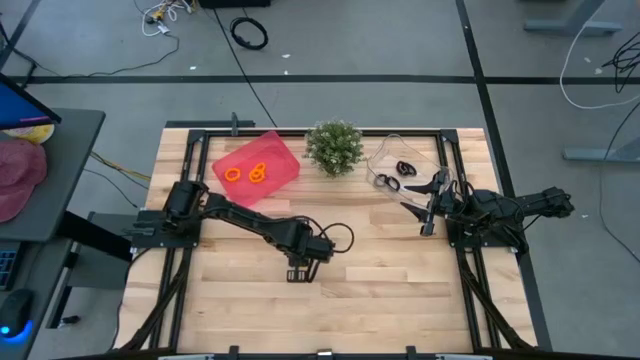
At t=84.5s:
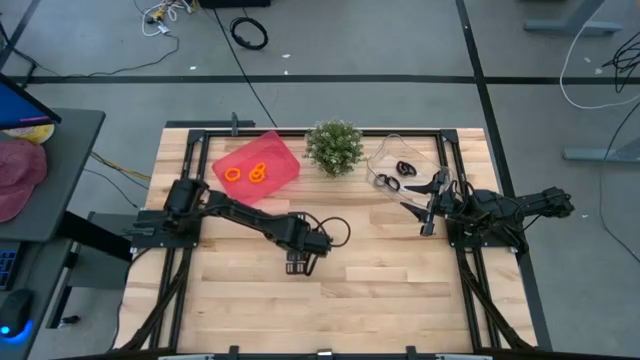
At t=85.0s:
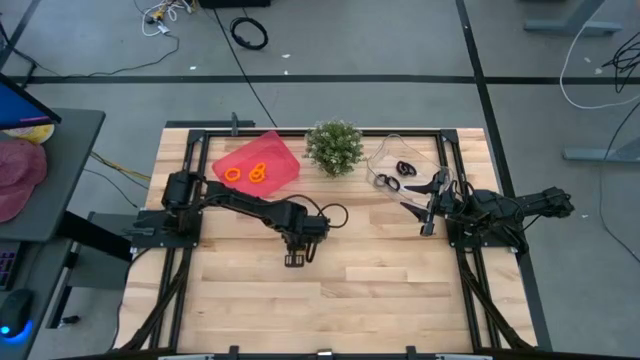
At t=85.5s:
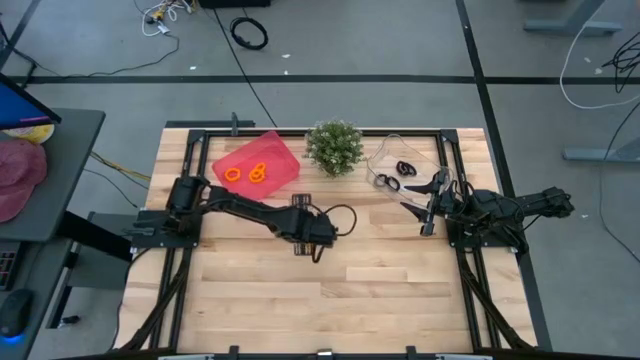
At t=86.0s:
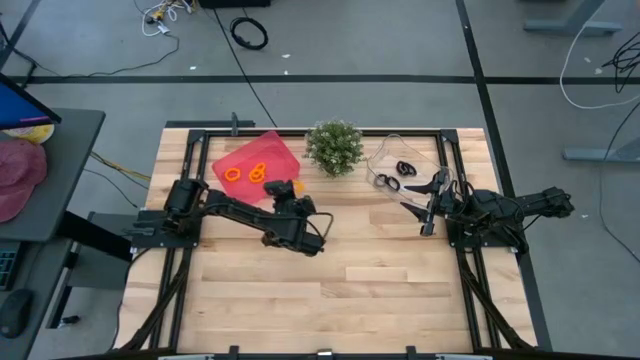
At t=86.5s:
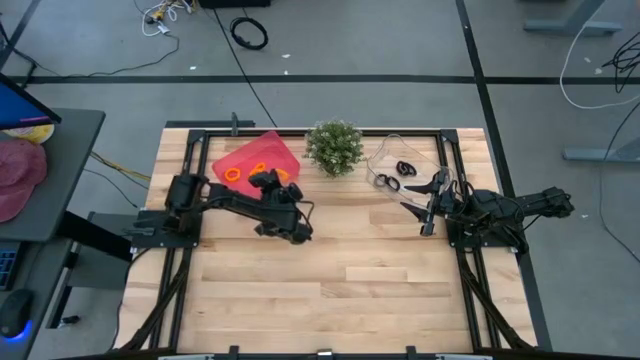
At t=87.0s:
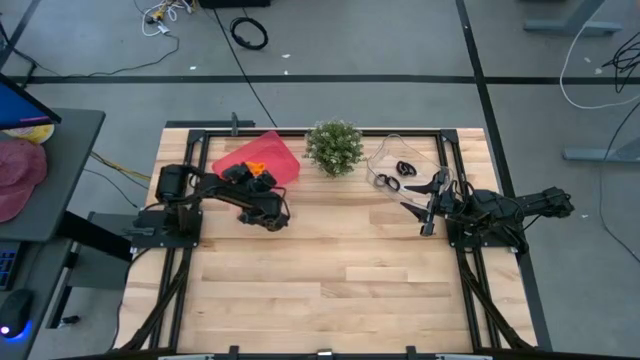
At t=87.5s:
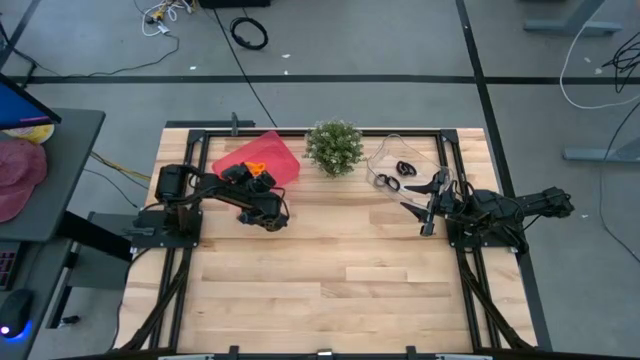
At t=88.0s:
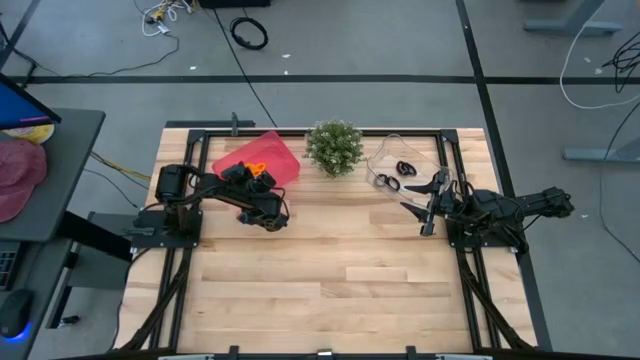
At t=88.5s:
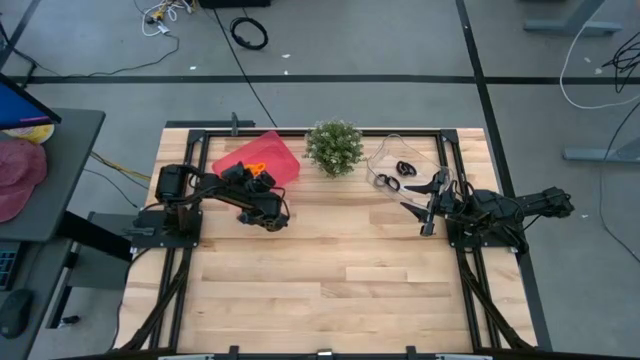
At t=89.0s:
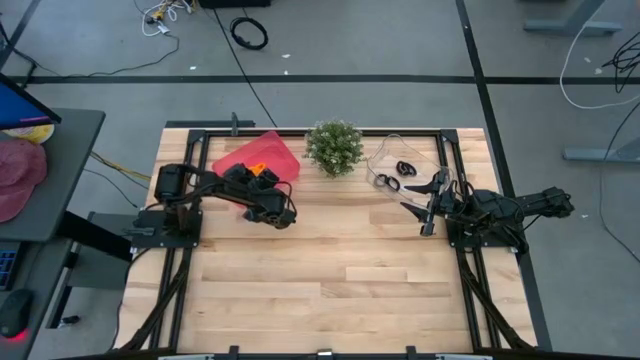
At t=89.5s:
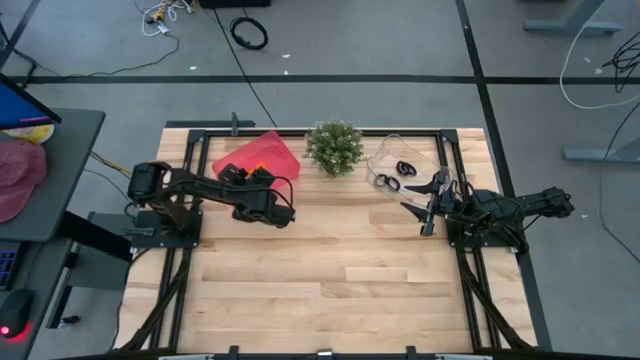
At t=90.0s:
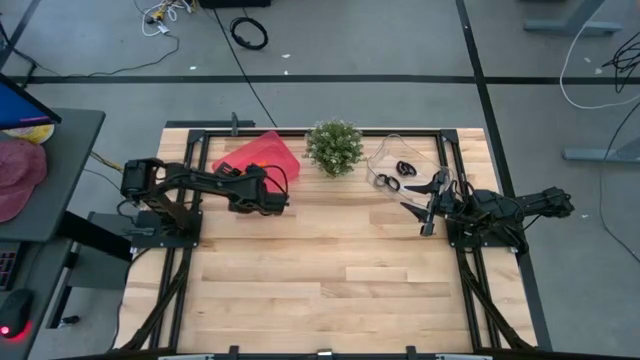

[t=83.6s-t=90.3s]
Task: Sort spring keychains
Put the yellow spring keychain into the pink bin

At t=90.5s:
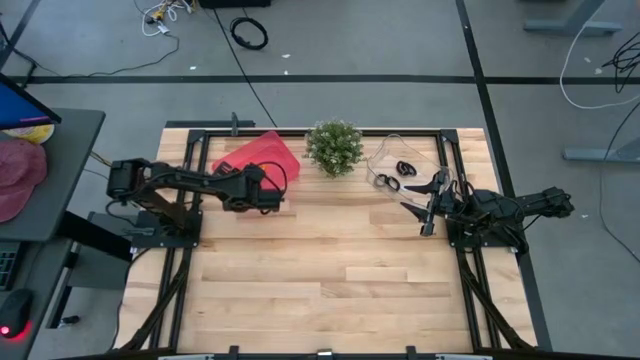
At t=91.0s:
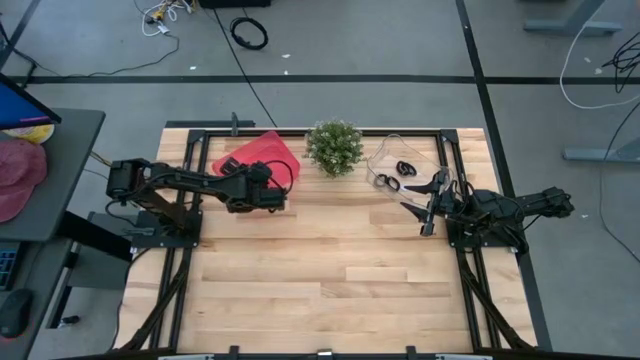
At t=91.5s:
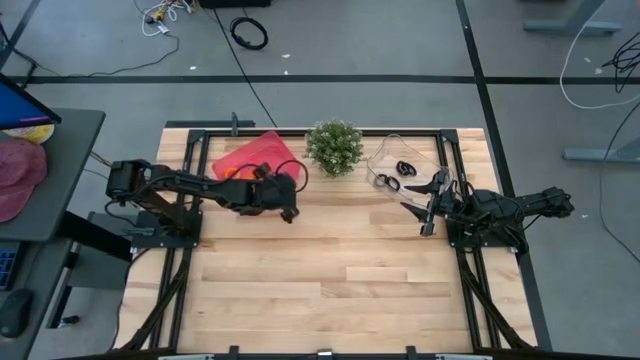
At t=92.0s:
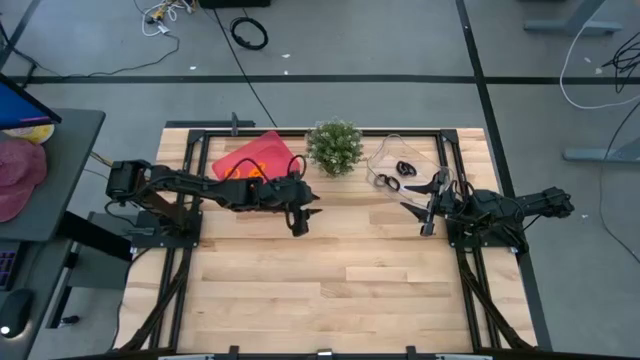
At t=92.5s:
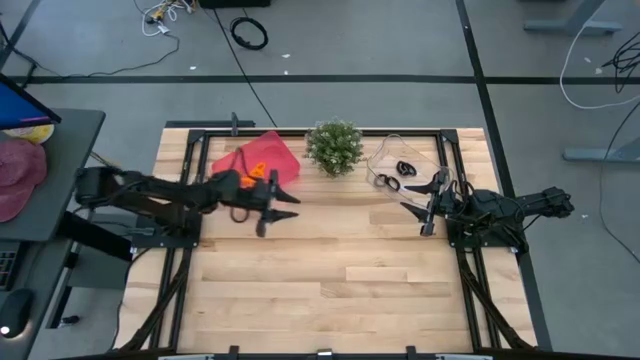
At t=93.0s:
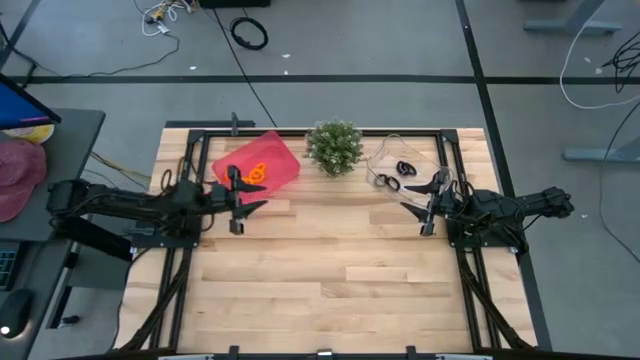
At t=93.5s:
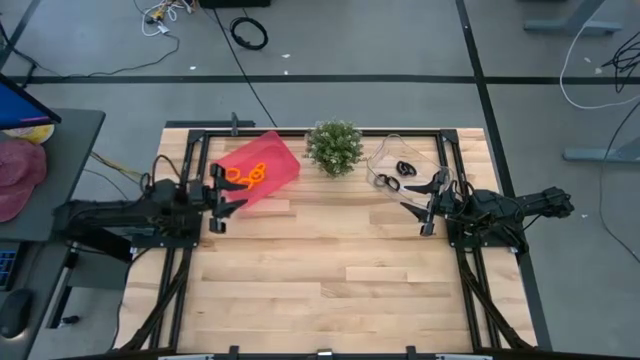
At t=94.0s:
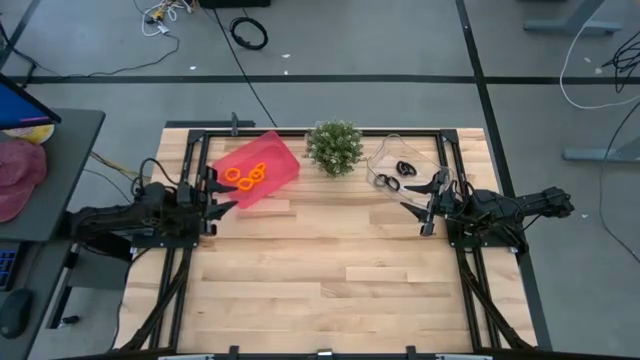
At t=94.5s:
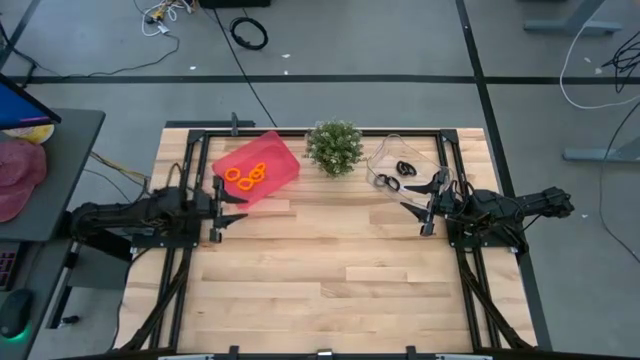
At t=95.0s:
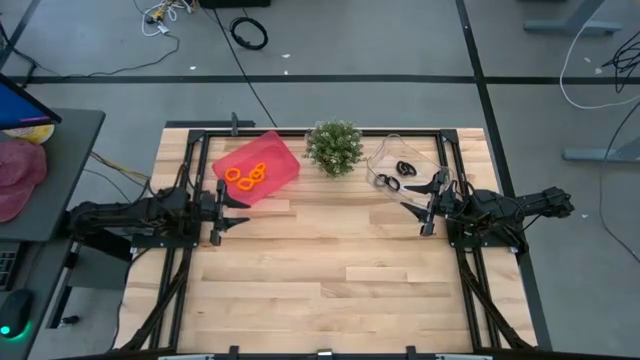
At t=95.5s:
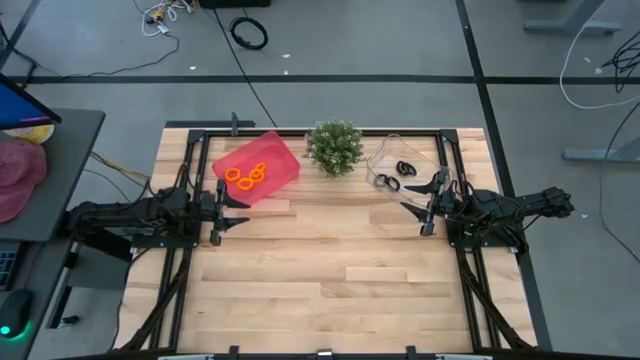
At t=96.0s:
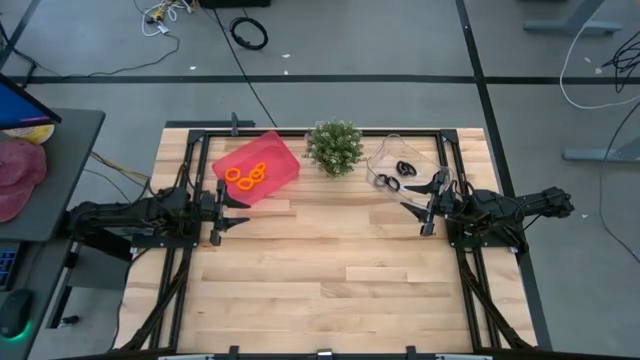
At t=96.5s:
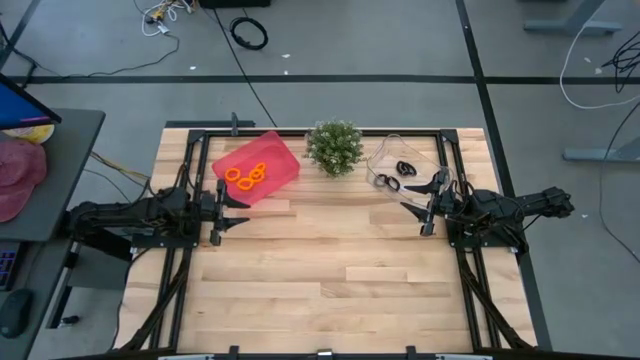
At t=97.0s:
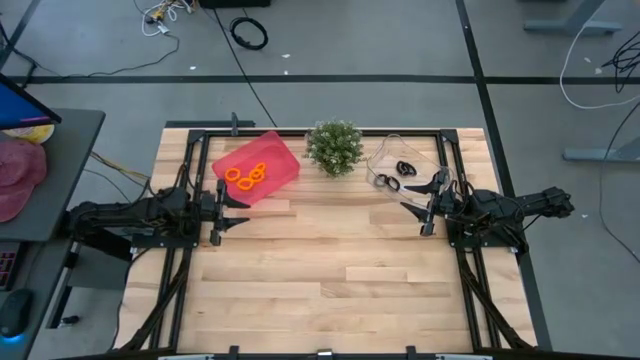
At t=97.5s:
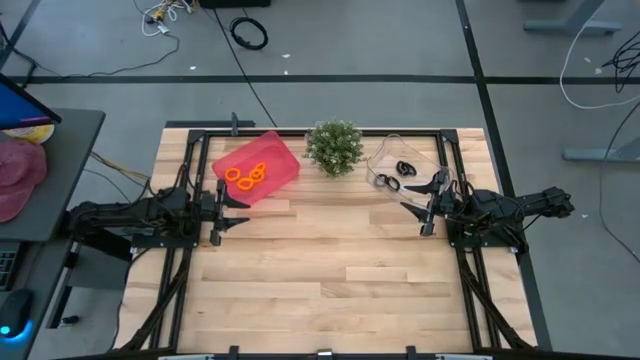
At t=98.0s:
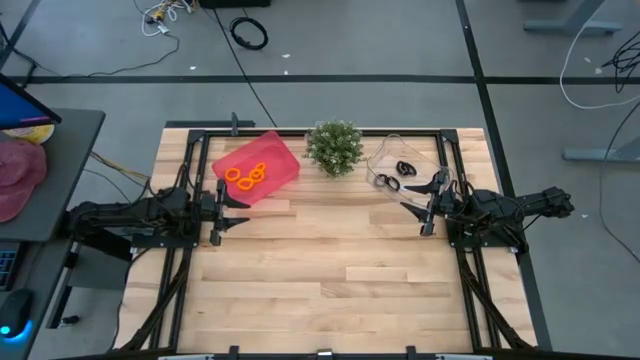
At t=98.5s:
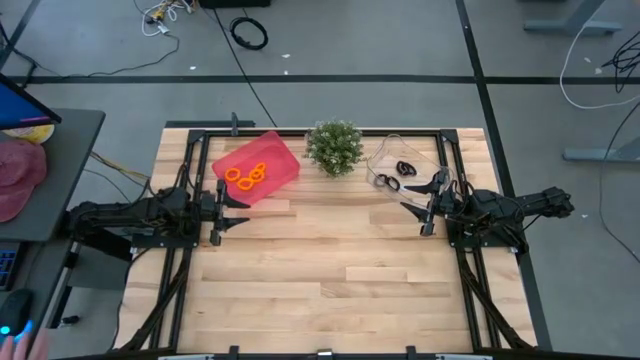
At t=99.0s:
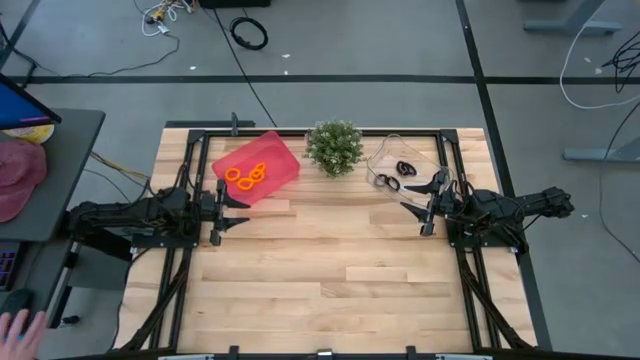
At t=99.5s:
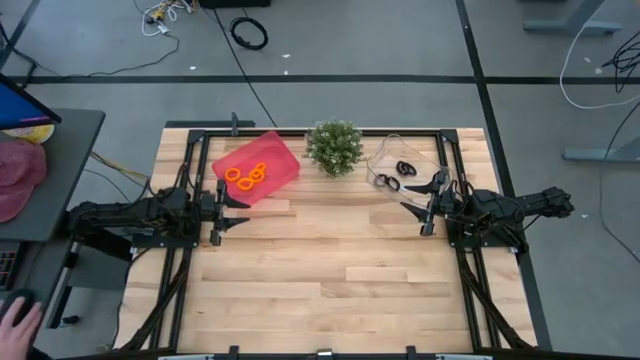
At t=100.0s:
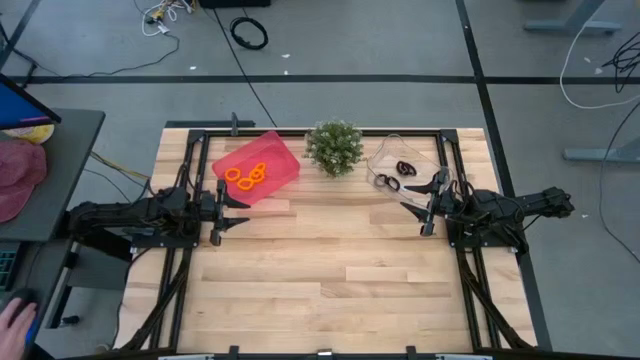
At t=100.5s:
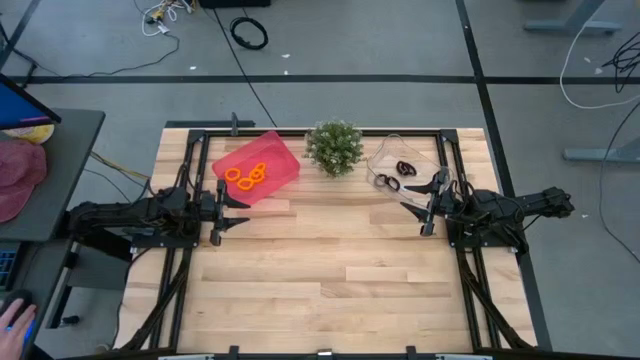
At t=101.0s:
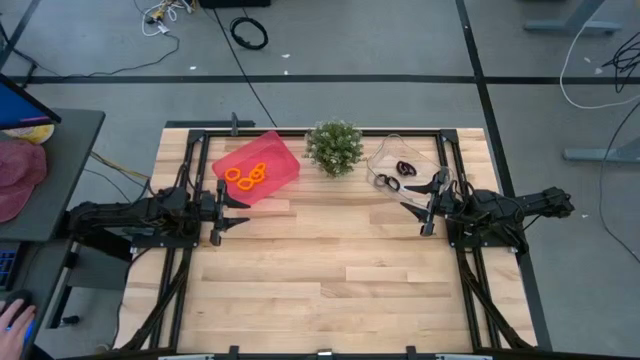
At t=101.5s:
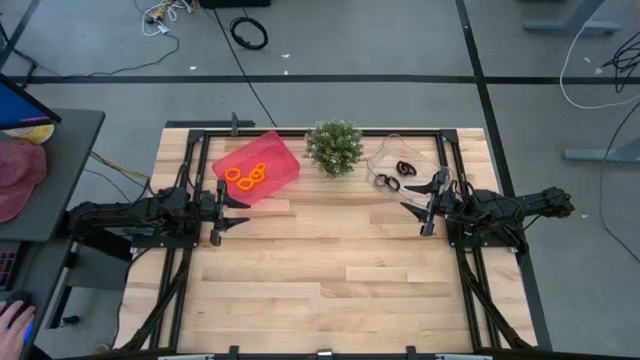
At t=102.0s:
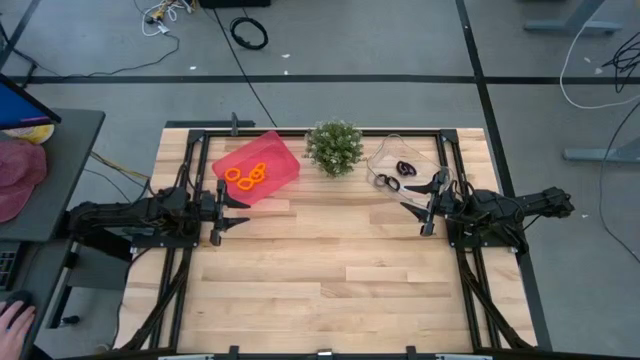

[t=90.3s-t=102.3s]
Return to Home Position

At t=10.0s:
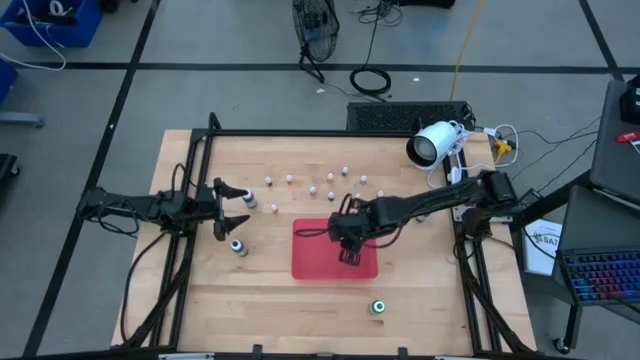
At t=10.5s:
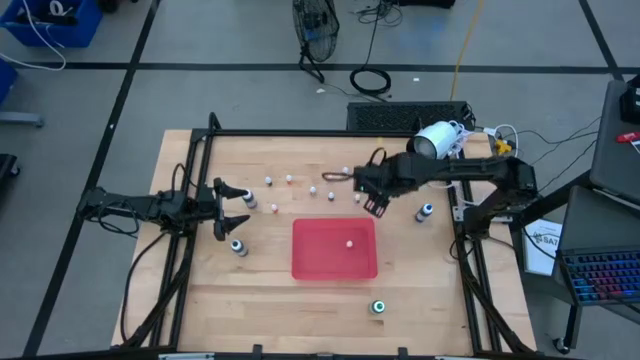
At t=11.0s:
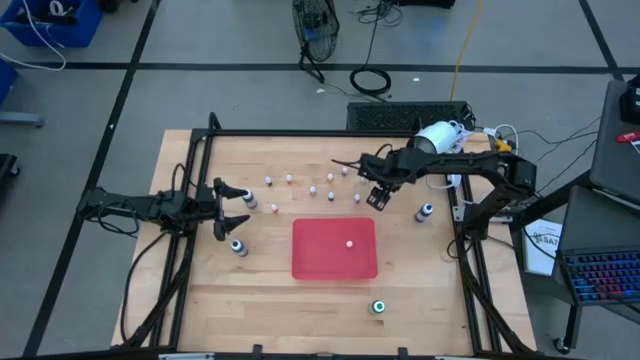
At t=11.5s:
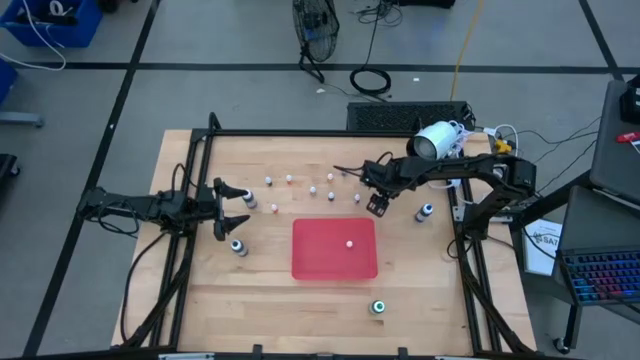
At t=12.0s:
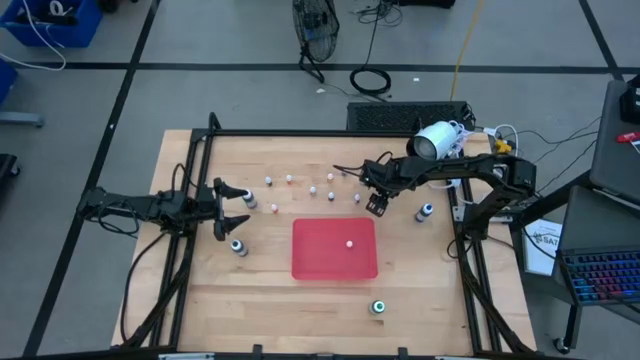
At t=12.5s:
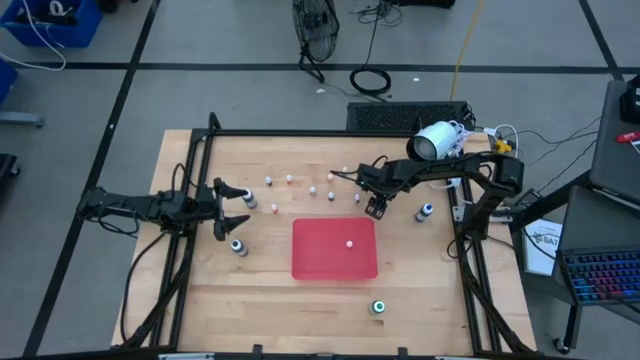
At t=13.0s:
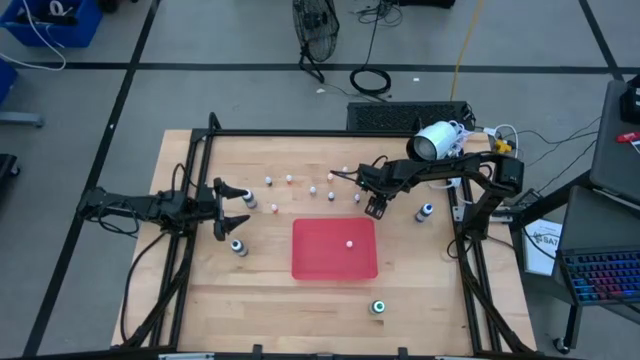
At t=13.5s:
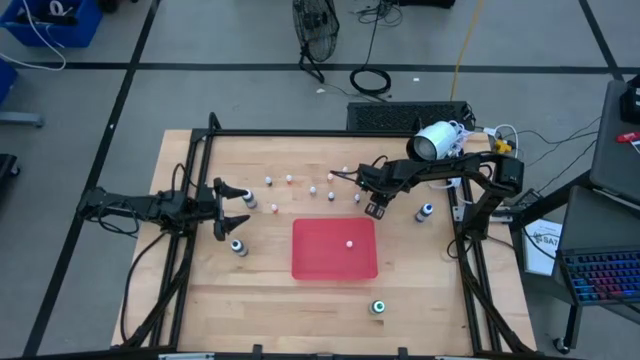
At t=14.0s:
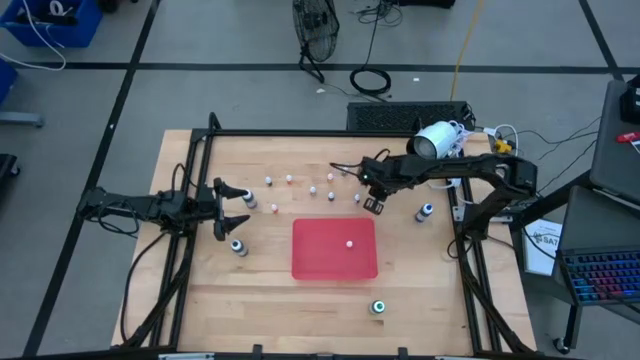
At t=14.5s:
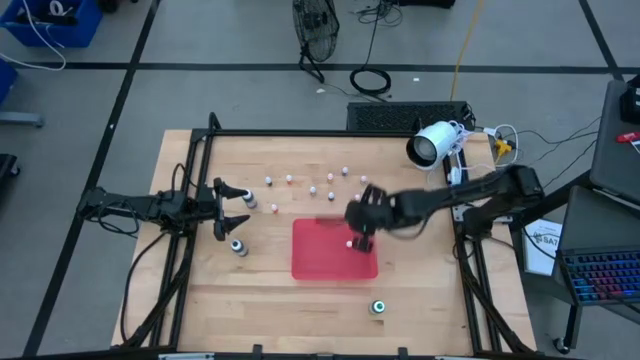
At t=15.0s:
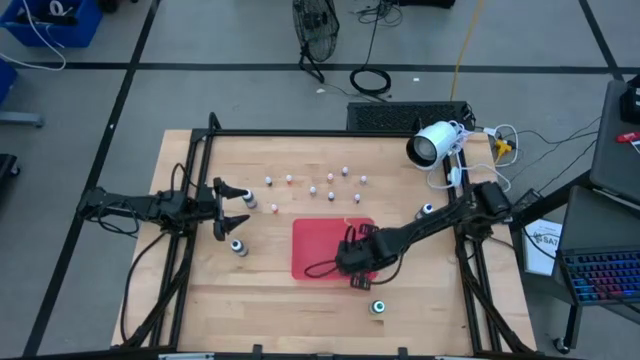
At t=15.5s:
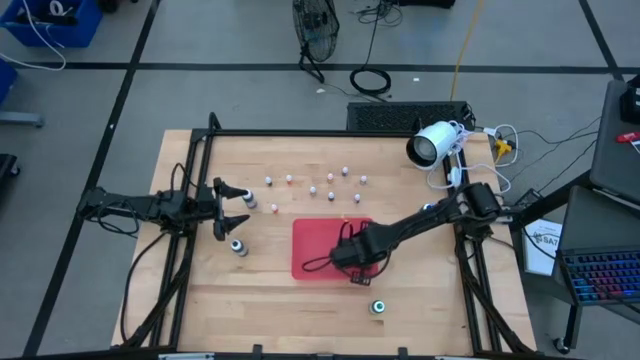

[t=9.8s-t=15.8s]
Task: Pick & Place food coloring
Put the small black food coloring bottle into the pink bin
